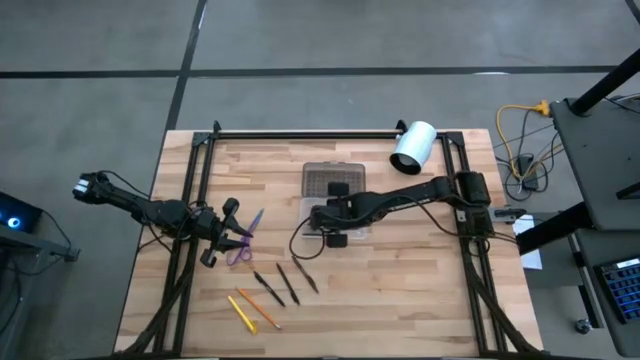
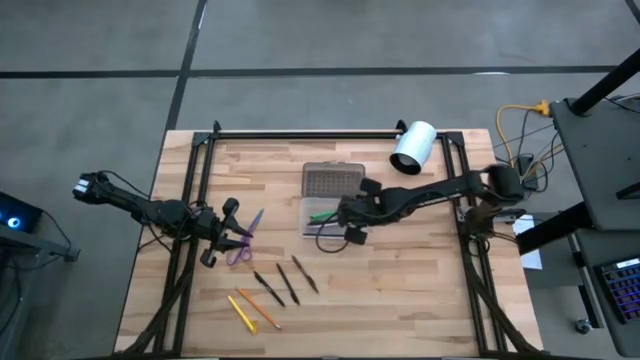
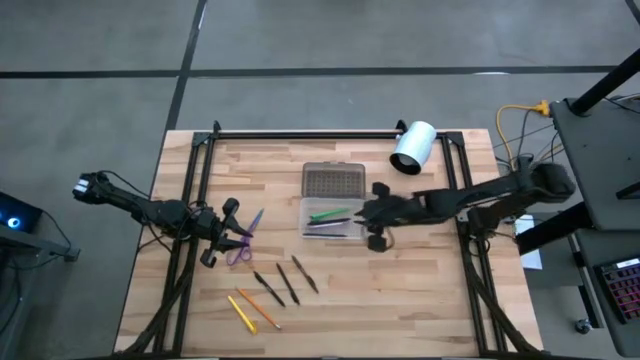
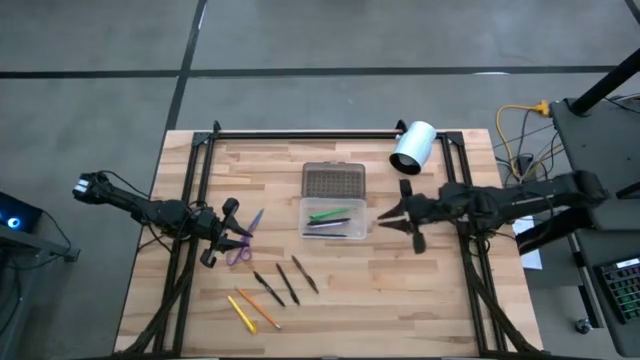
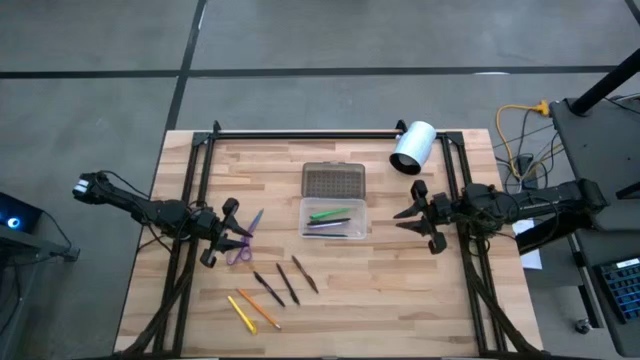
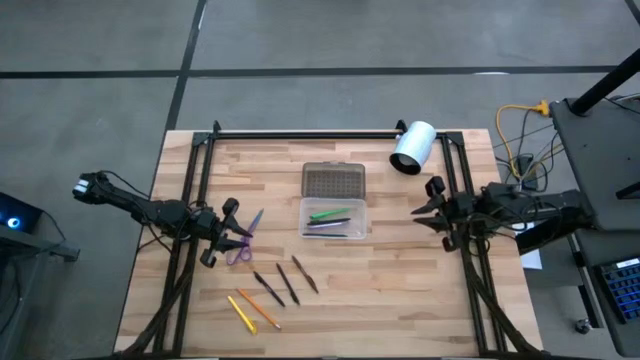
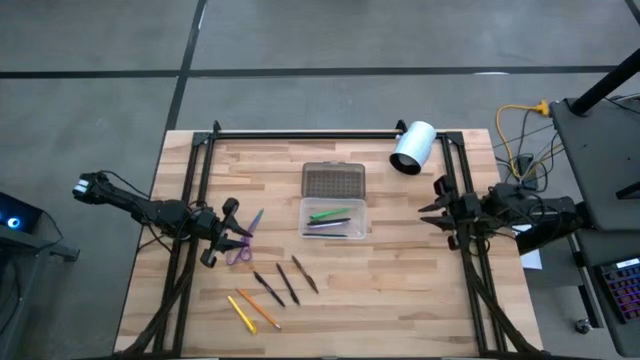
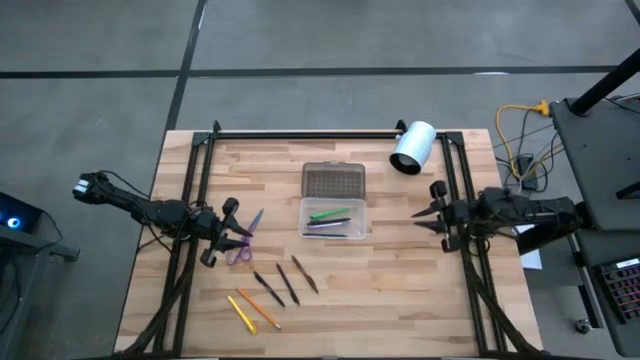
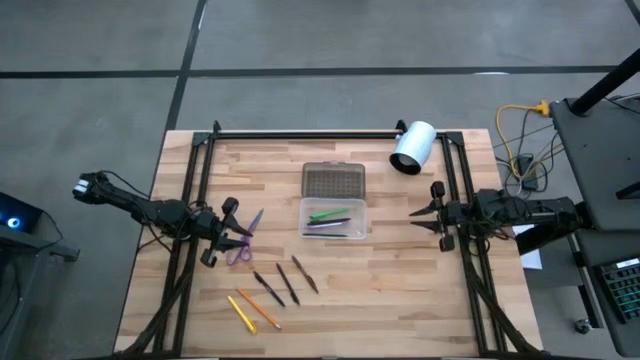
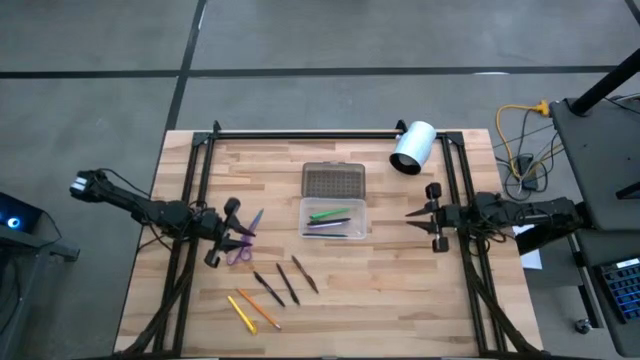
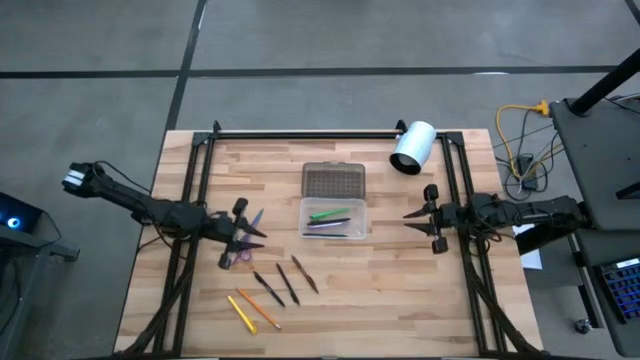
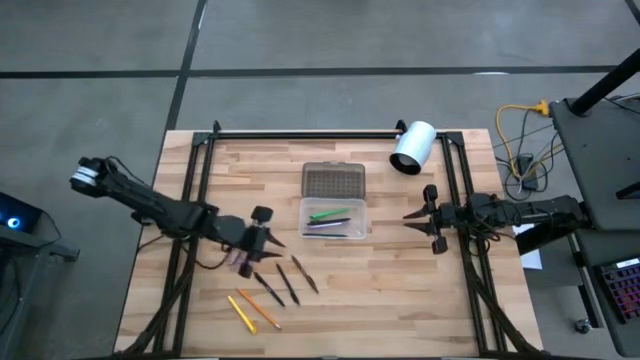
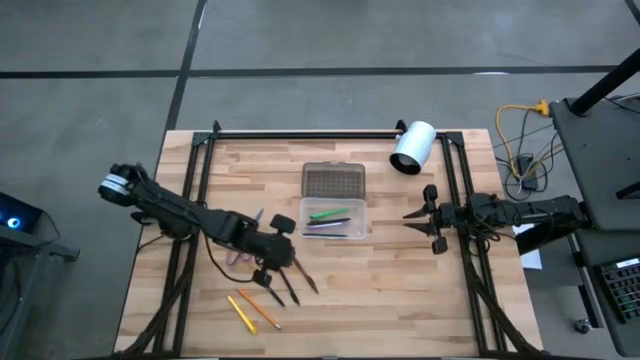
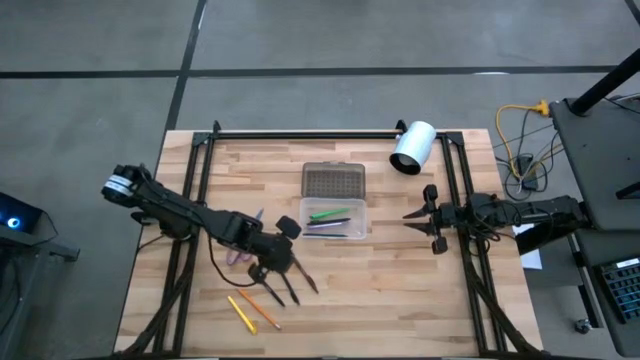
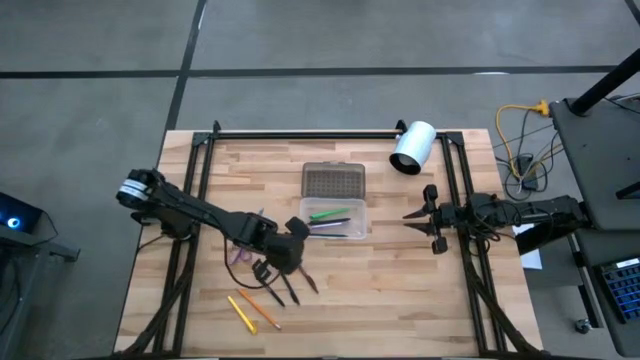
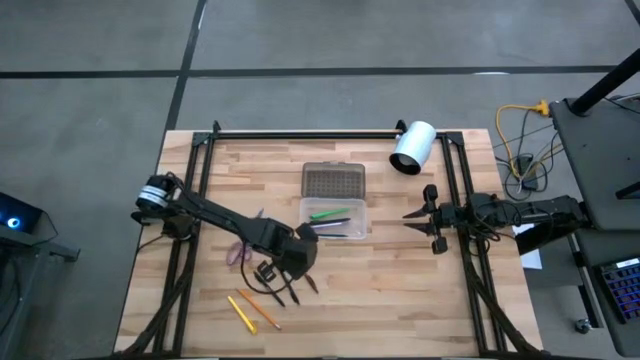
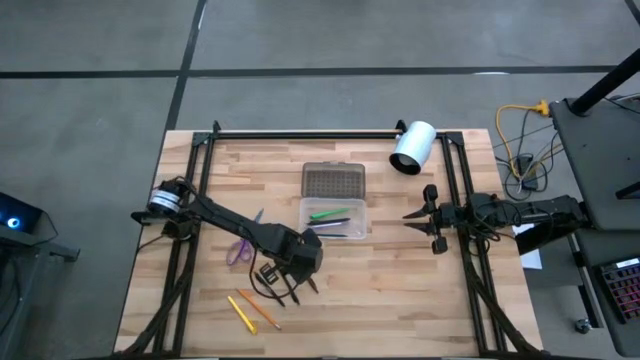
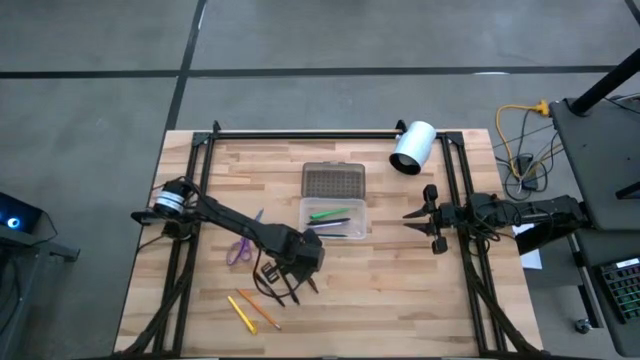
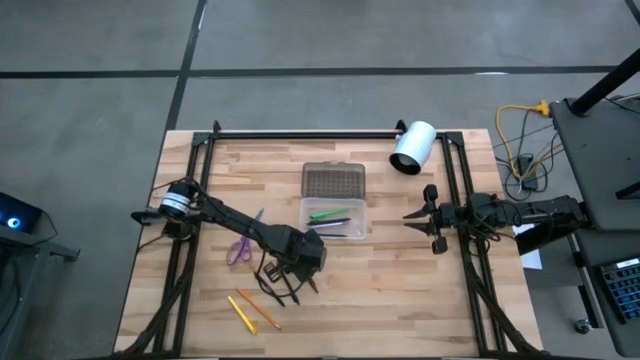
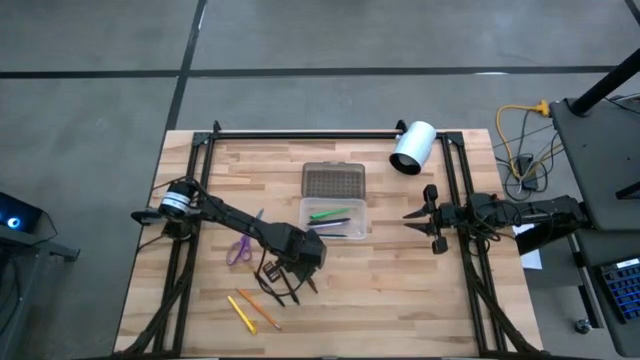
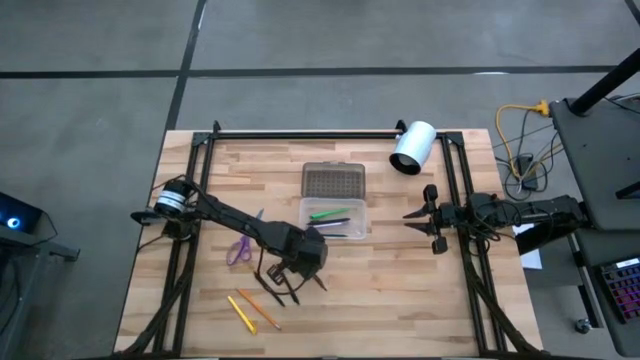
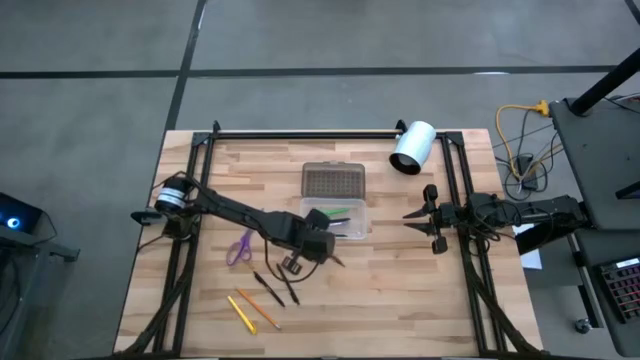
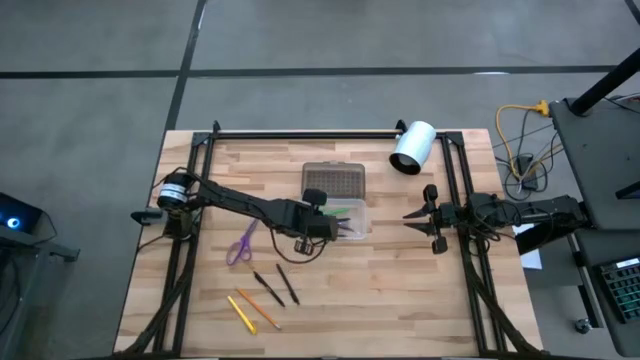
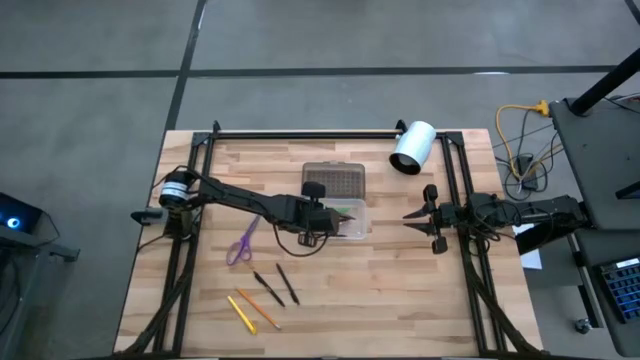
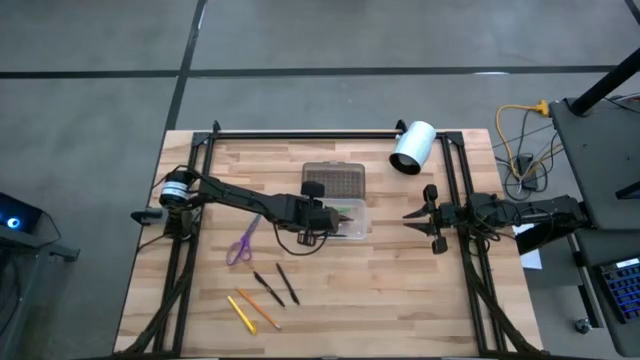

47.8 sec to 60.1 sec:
Task: Pick & place school supplies into a supply box
Put the brown pen into the white and black supply box

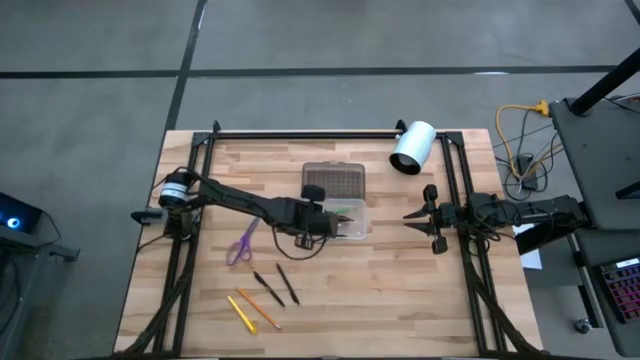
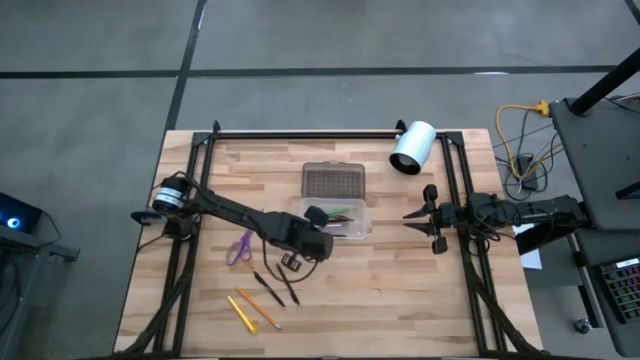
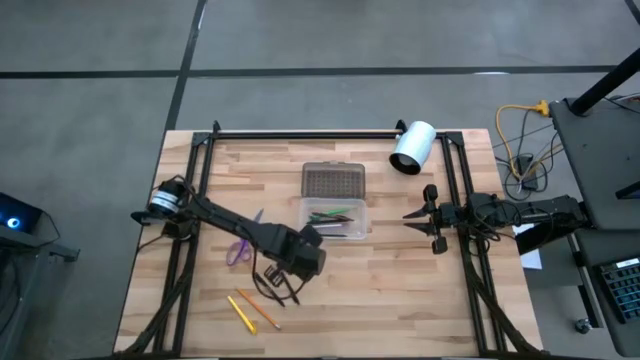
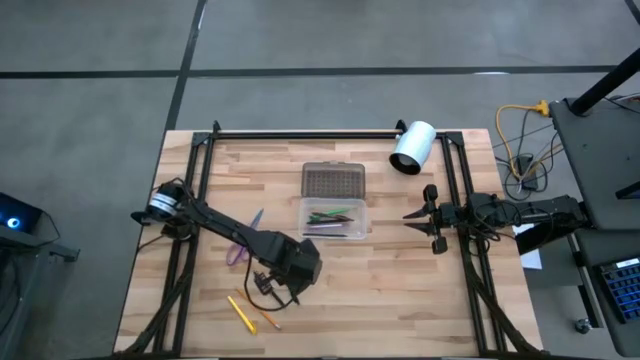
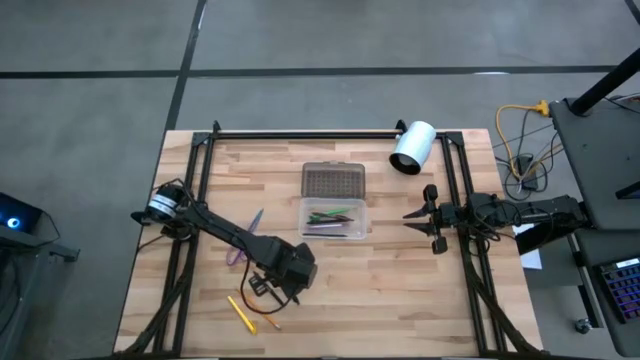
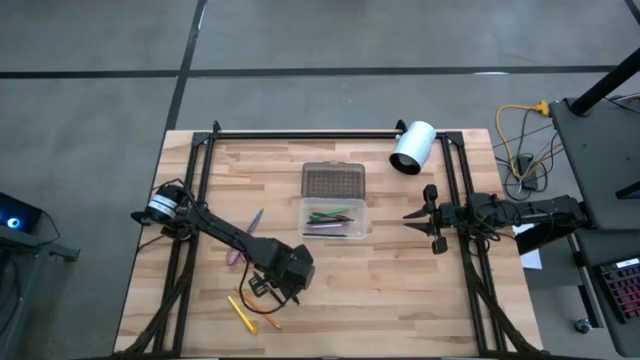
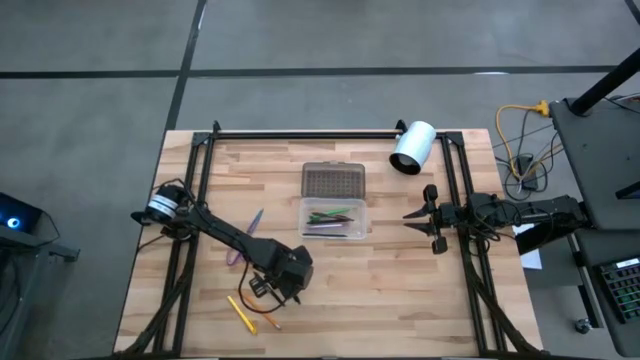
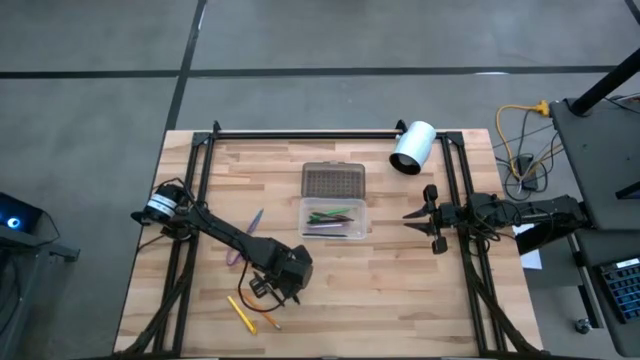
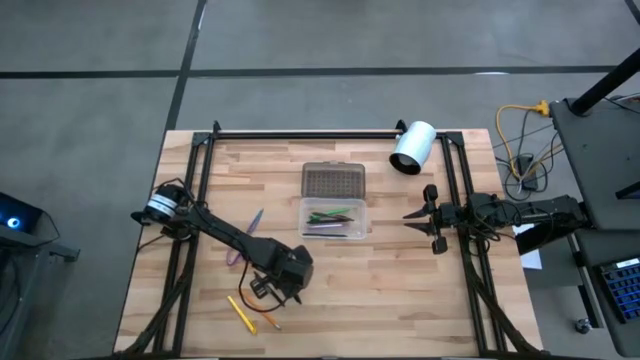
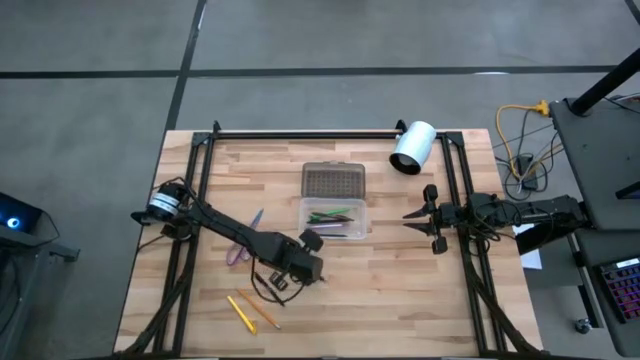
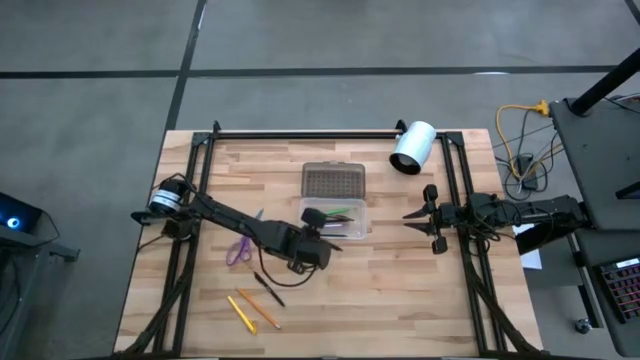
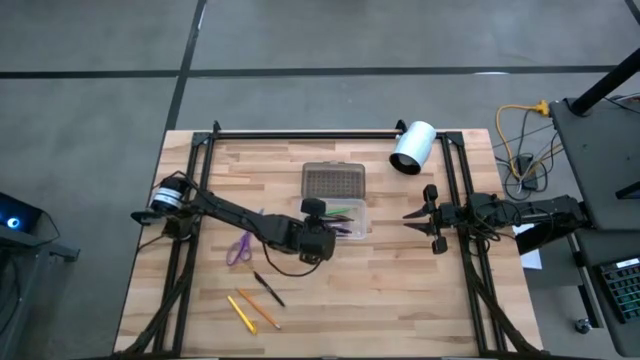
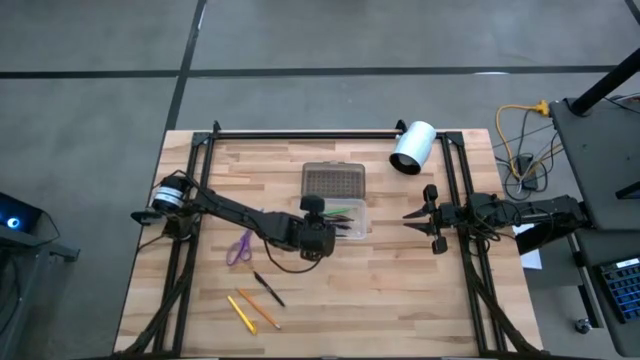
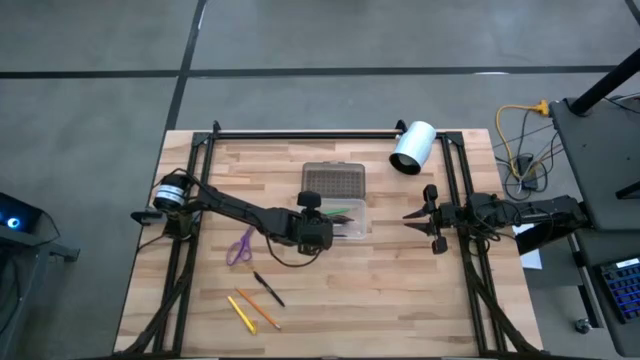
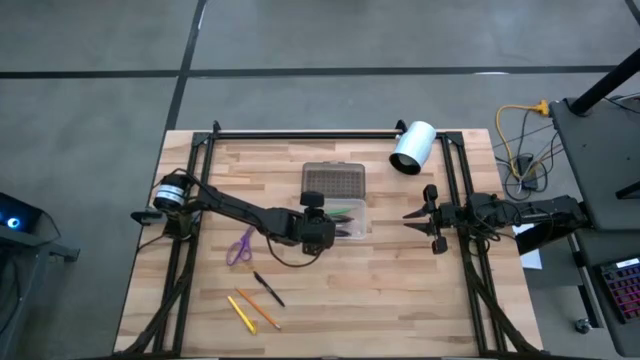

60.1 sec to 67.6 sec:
Put the black pen into the white and black supply box

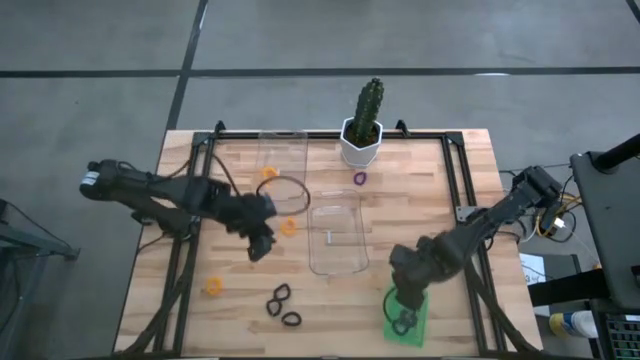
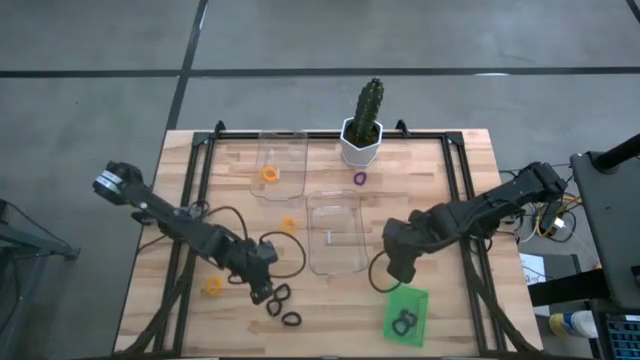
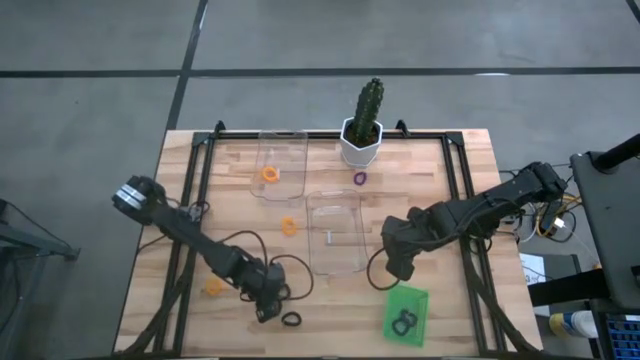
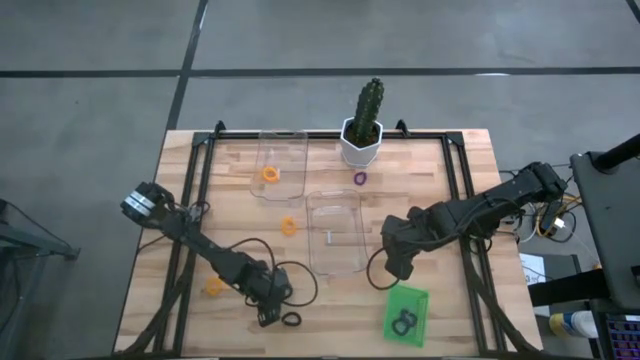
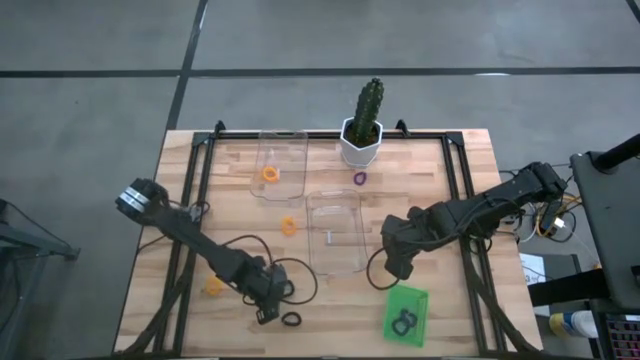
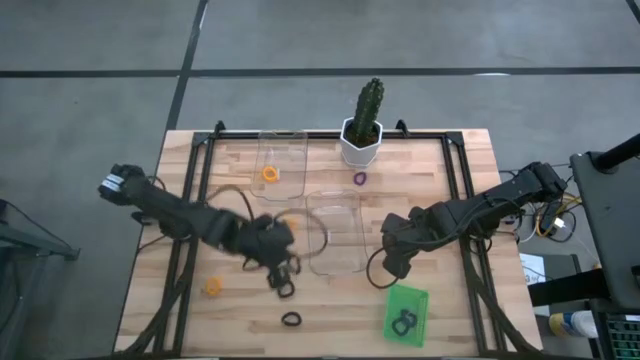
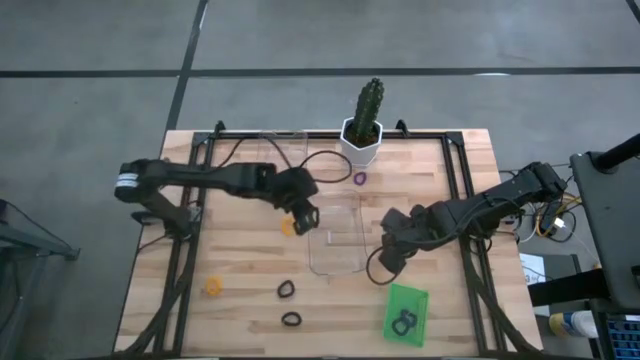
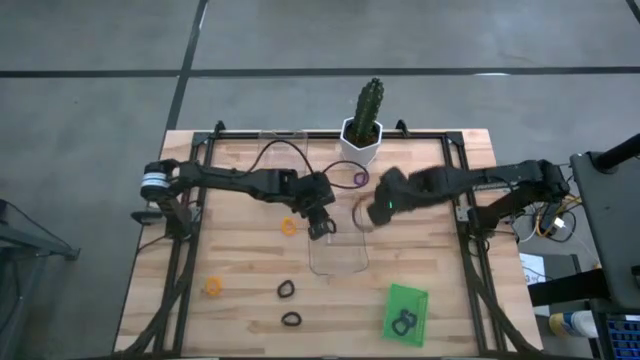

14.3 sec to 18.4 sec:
Task: Sort spring keychains
Put the middle black spring keychain into the bottom transparent bin
